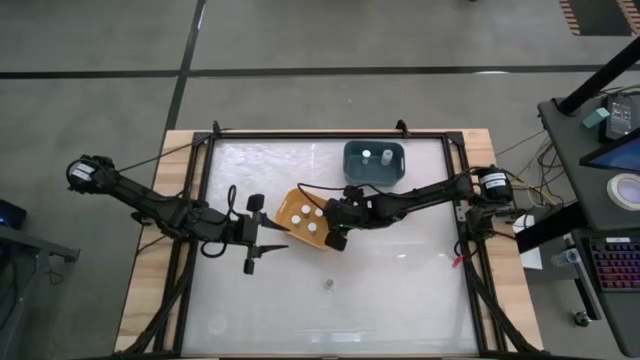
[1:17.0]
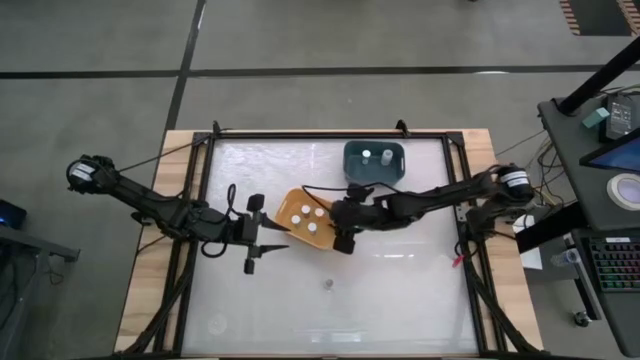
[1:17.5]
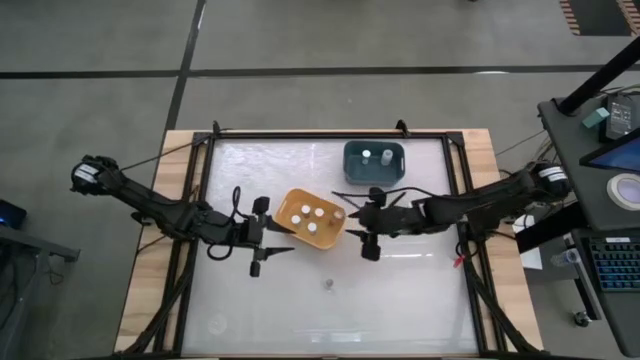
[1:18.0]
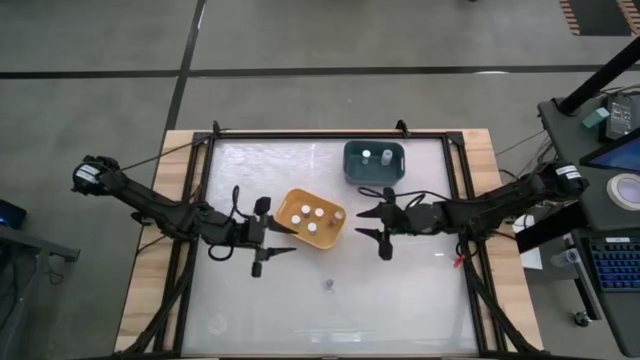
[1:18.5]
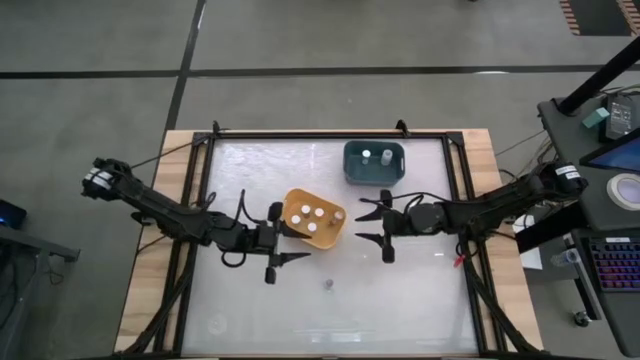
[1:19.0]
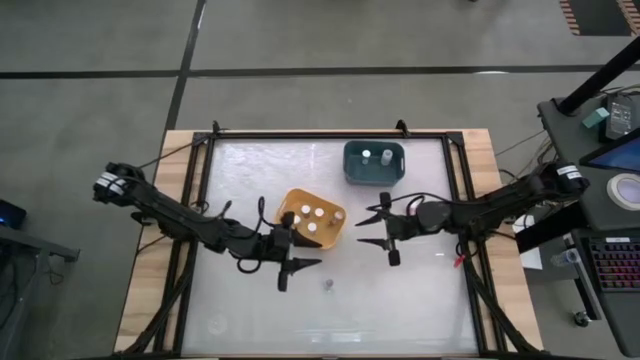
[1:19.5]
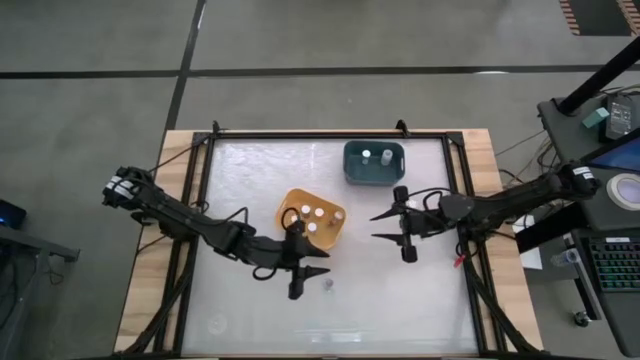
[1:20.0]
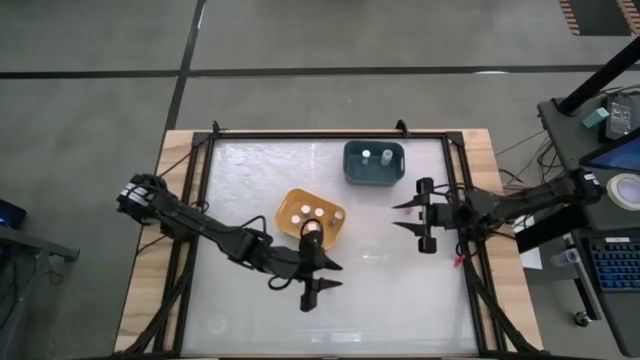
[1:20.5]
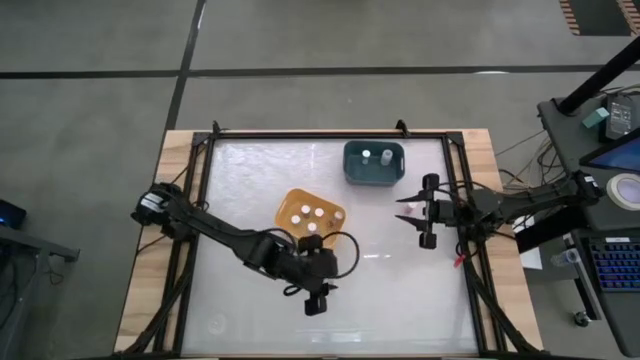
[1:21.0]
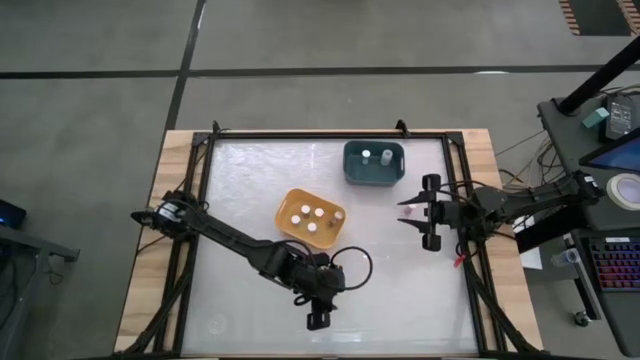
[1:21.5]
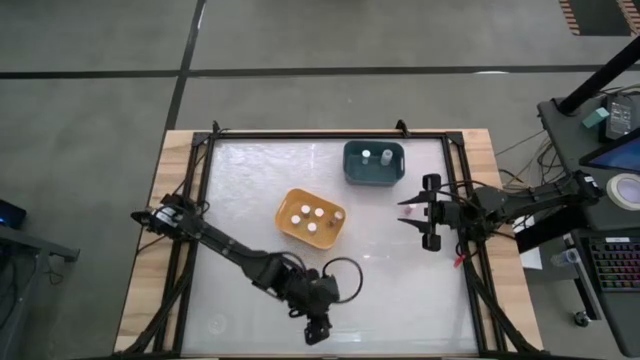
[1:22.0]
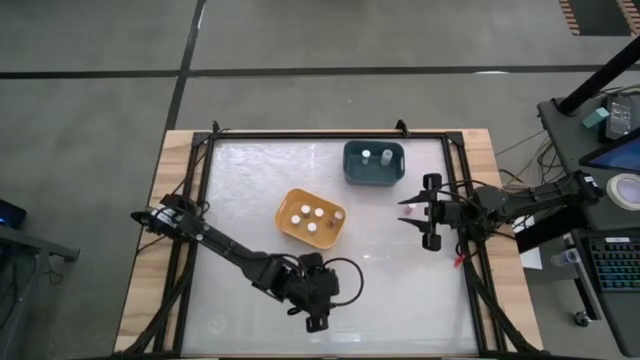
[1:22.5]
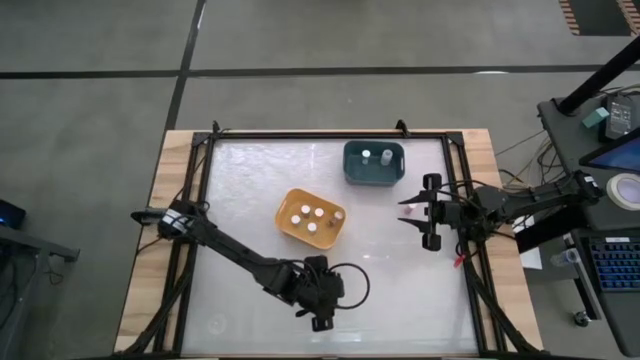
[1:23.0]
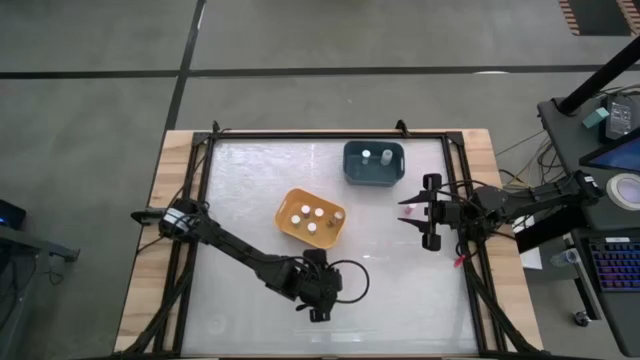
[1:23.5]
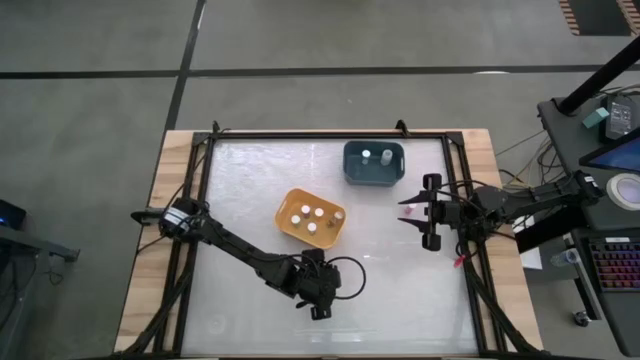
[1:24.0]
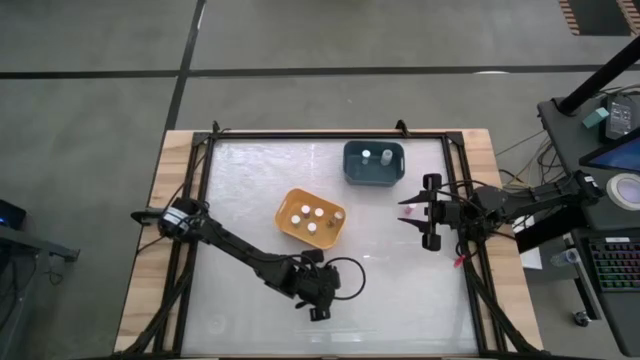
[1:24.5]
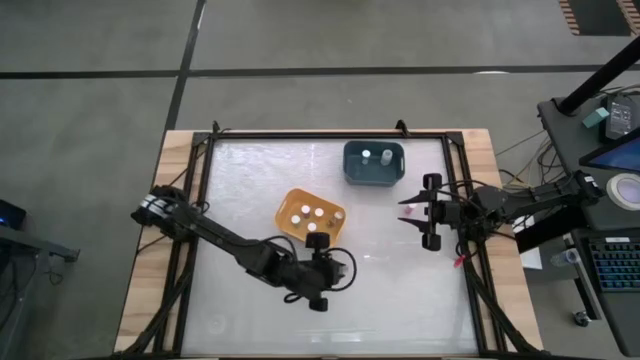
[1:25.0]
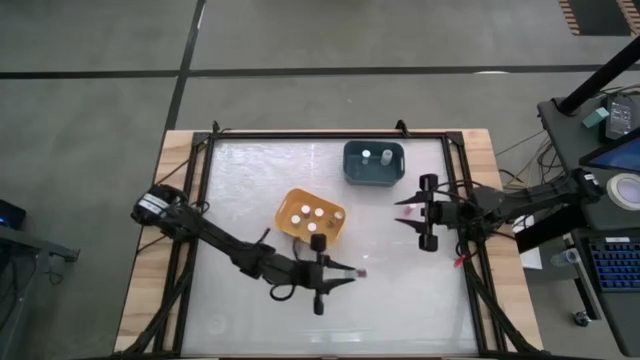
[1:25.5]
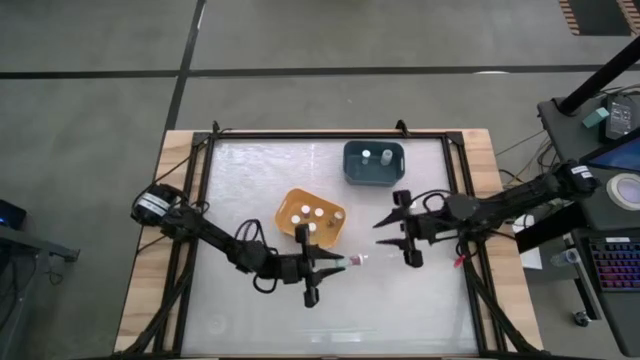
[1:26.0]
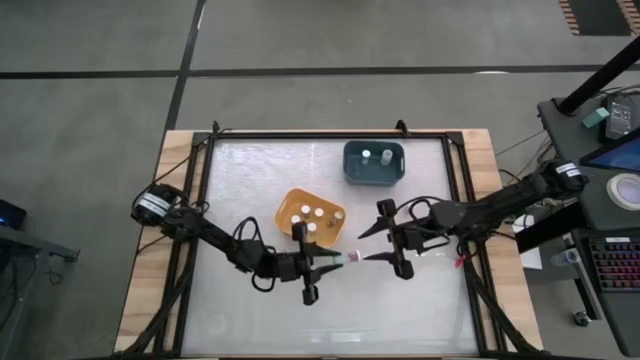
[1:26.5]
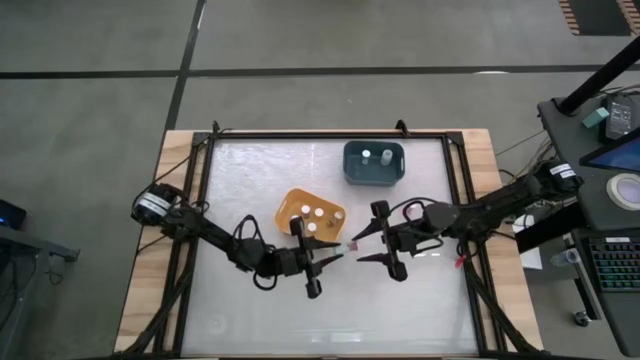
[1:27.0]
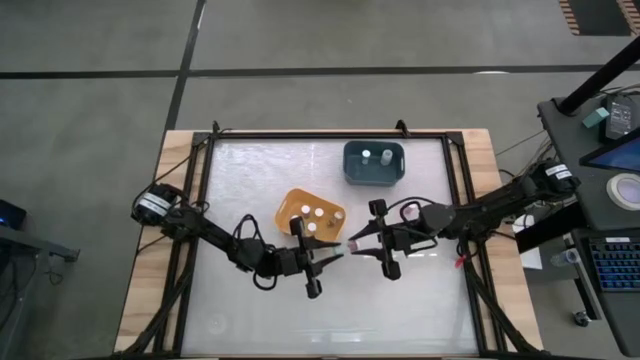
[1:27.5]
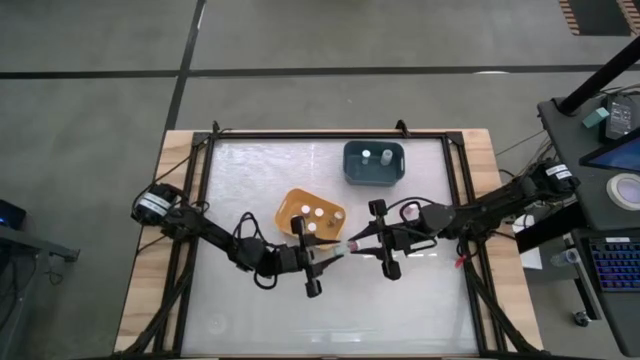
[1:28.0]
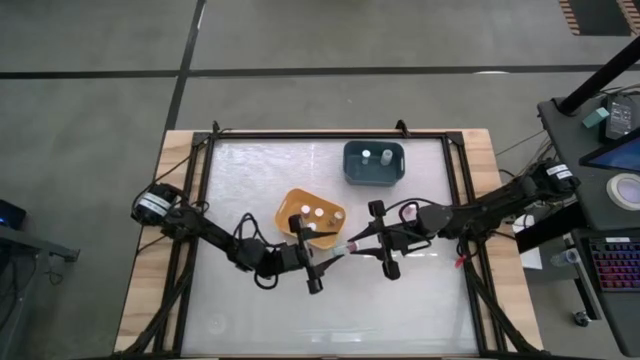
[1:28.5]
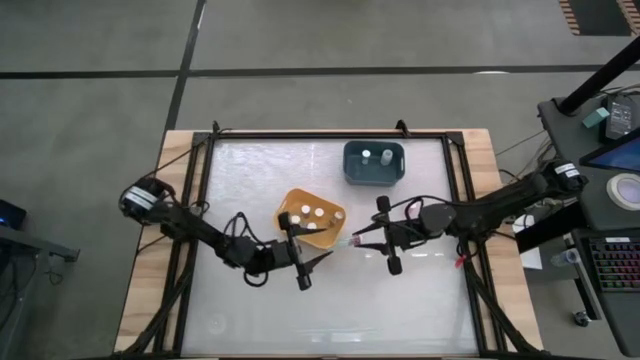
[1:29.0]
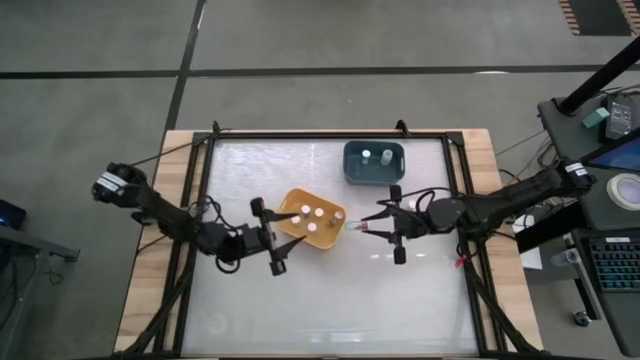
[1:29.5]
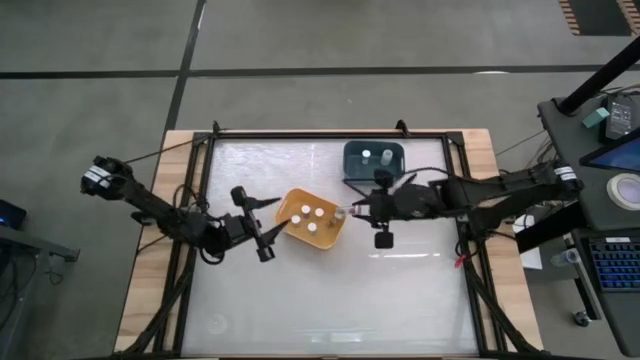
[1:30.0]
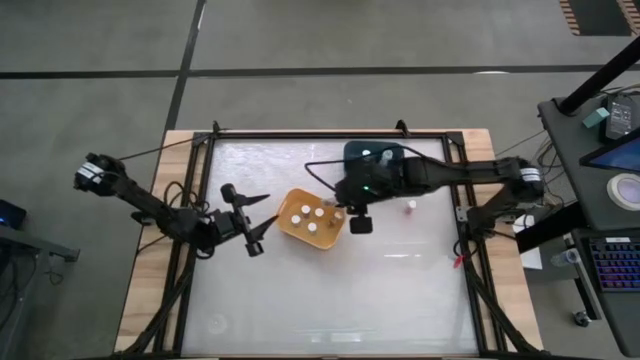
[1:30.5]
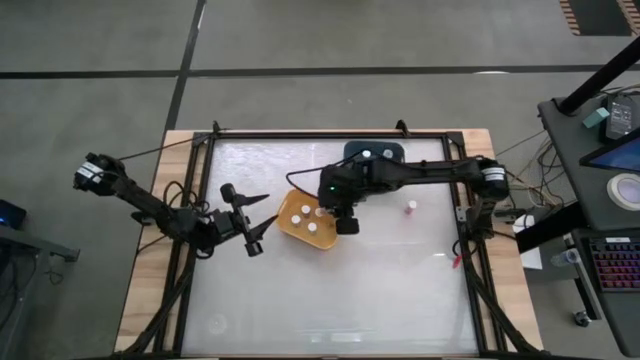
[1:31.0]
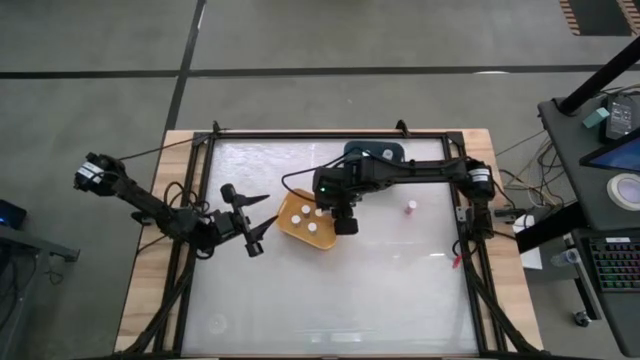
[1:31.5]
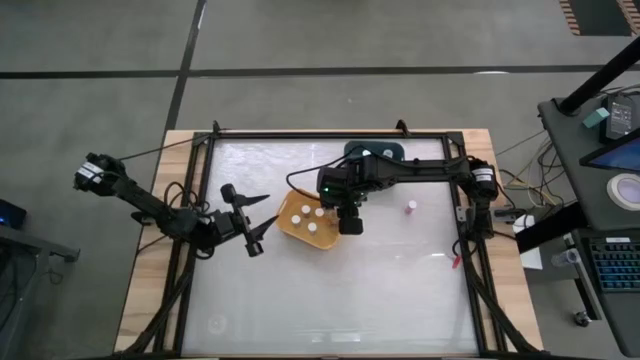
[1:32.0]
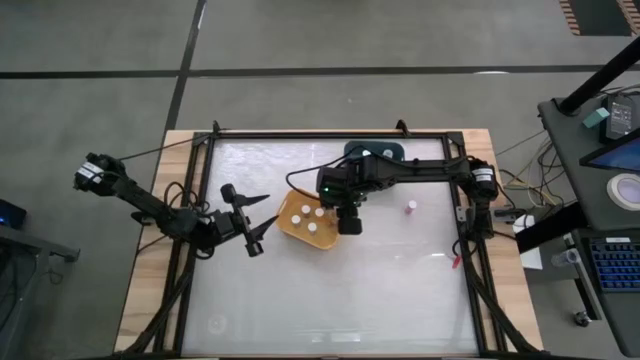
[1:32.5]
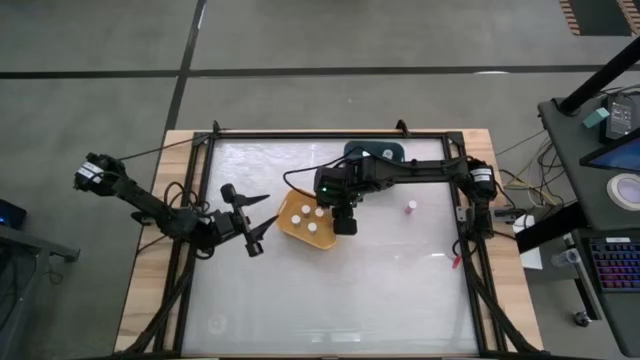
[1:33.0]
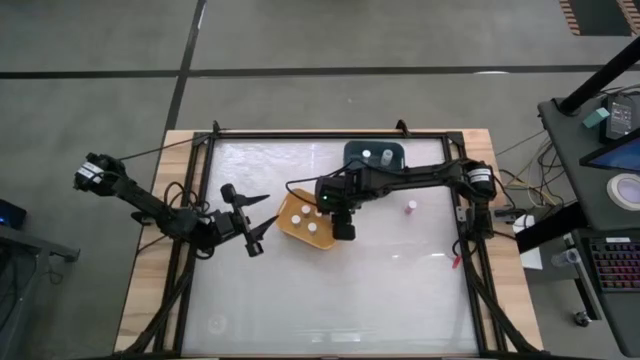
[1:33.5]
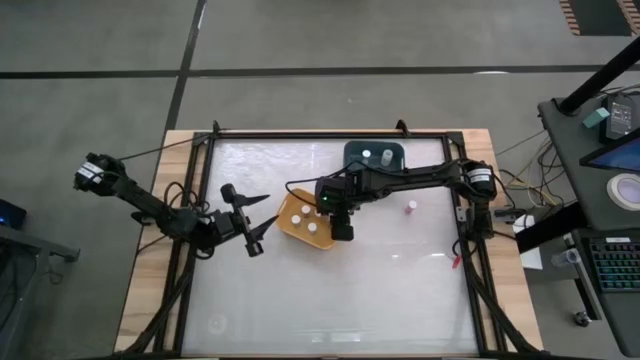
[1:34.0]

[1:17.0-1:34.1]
Task: Pick and place medicine bottles into bin by pill shape (circle, oval)
Put the blue pill bottle into the yellow bin

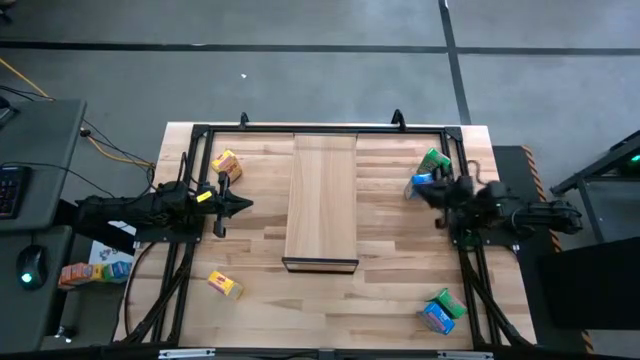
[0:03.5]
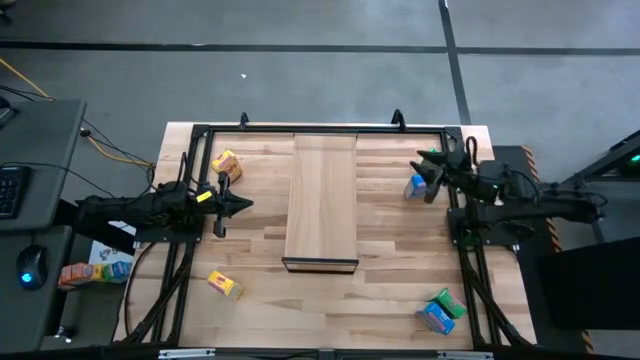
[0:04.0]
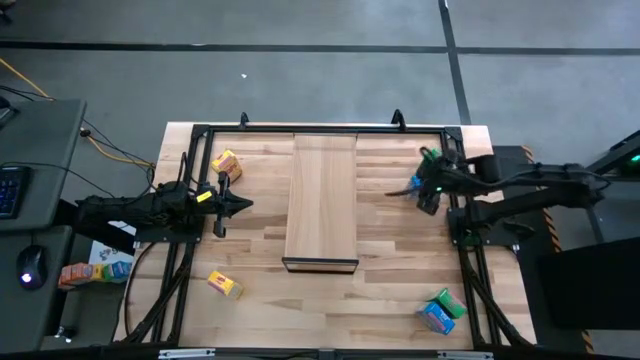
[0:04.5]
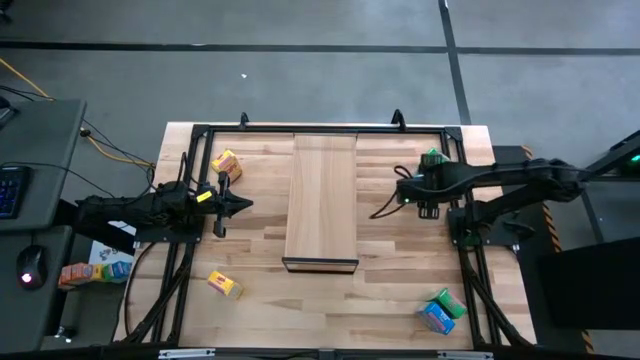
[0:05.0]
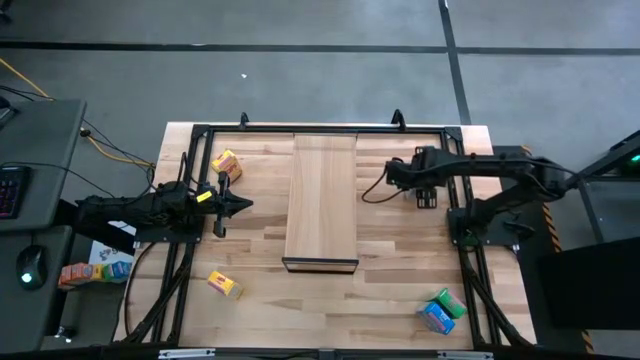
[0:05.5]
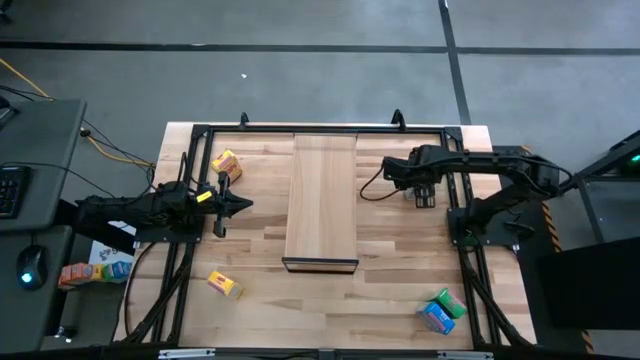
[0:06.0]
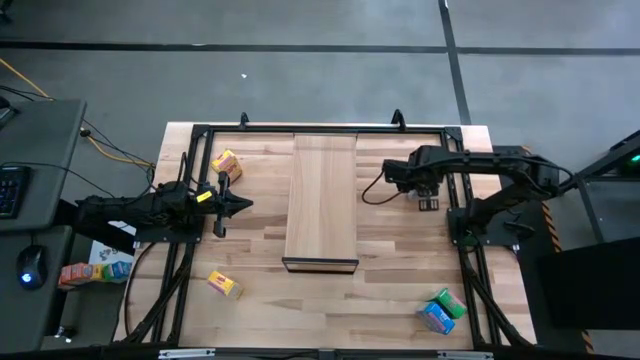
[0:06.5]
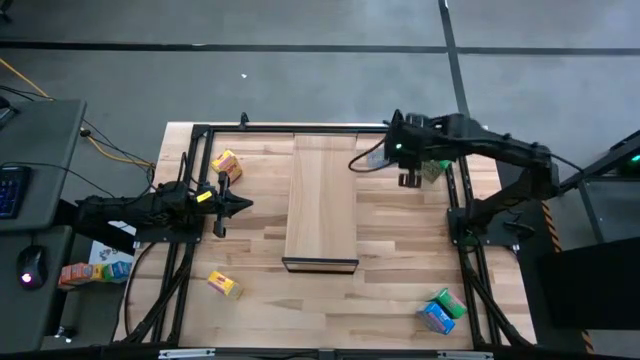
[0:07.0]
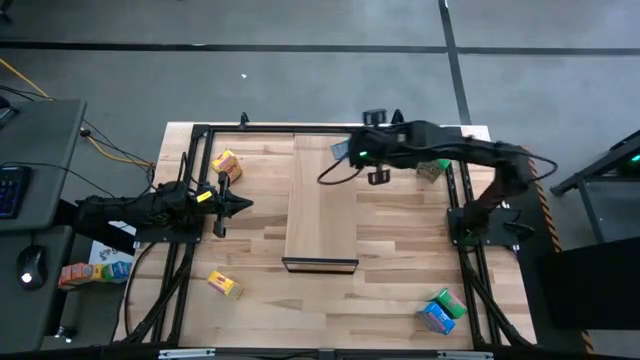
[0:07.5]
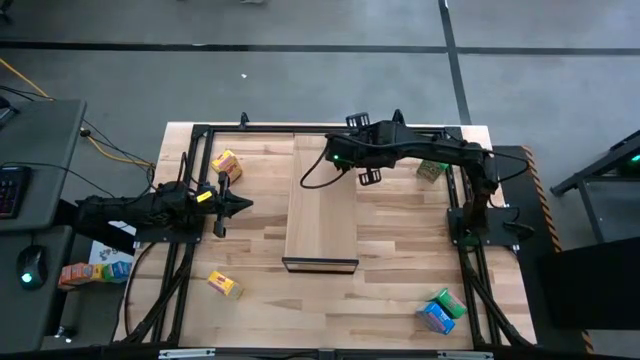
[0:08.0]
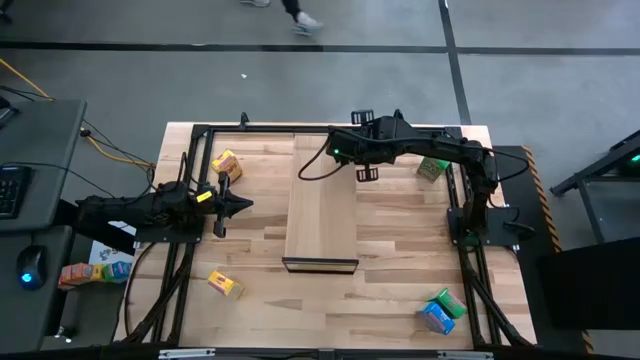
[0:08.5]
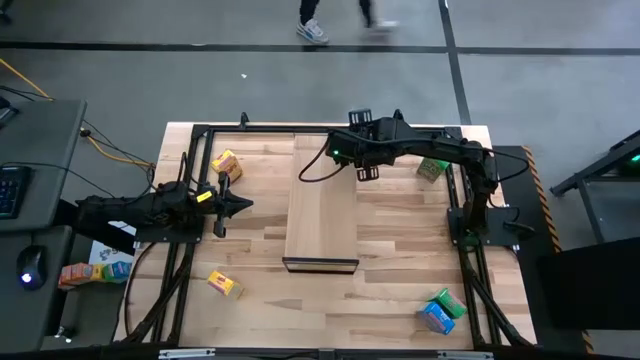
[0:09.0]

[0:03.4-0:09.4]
Task: Stack cereal on shelf
Put the top blue cereal box on the shelf
